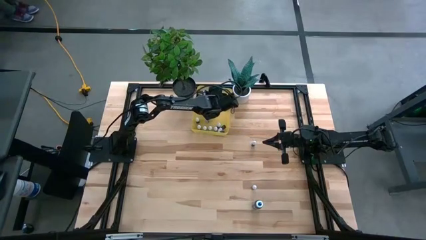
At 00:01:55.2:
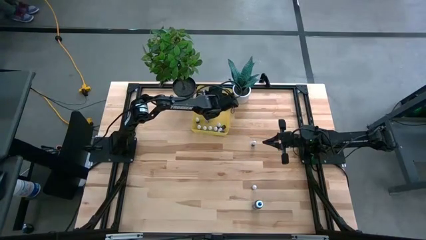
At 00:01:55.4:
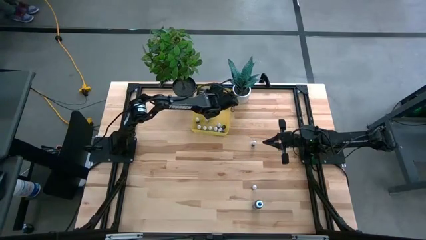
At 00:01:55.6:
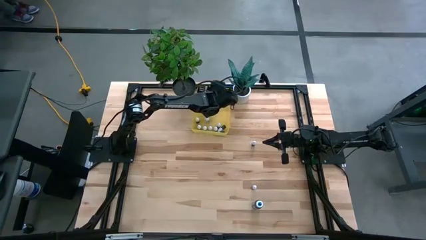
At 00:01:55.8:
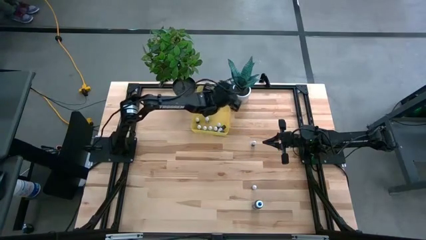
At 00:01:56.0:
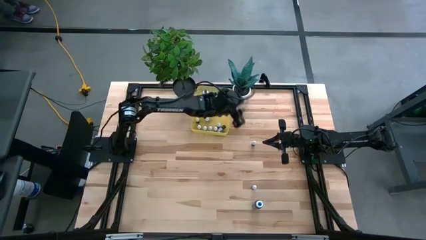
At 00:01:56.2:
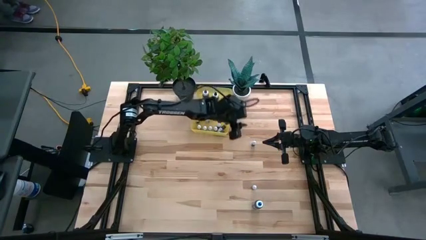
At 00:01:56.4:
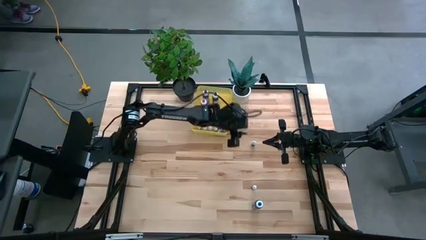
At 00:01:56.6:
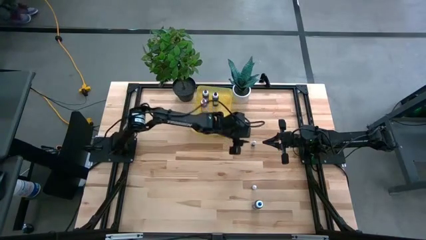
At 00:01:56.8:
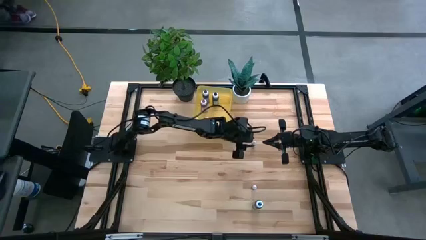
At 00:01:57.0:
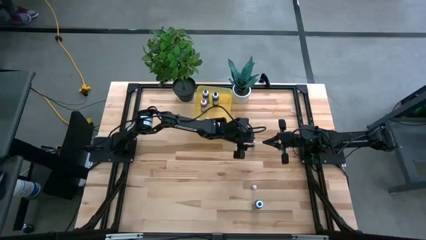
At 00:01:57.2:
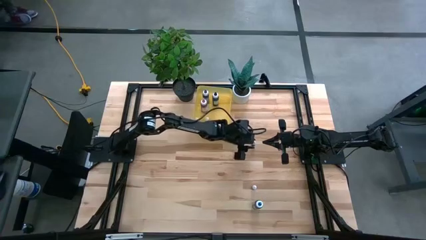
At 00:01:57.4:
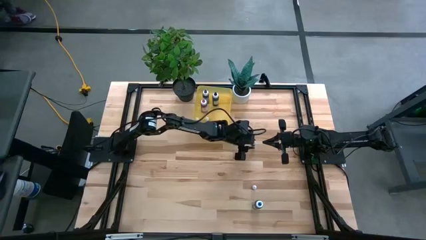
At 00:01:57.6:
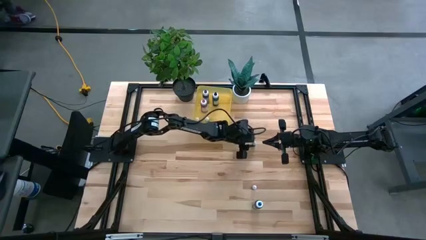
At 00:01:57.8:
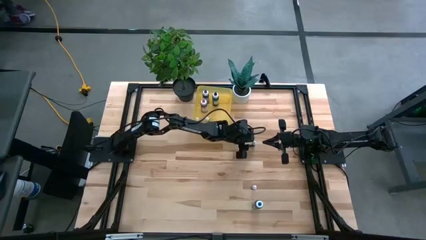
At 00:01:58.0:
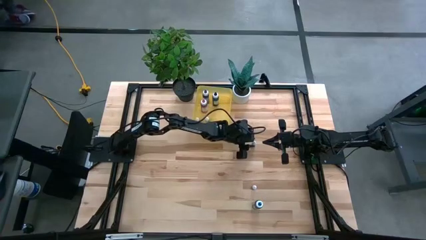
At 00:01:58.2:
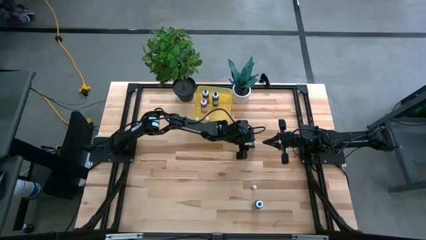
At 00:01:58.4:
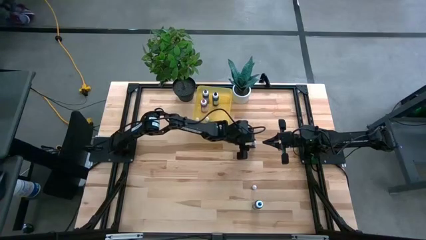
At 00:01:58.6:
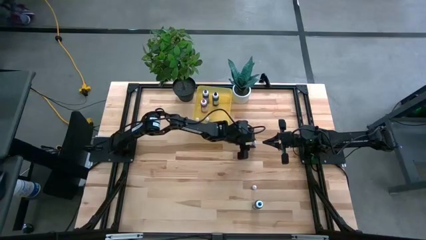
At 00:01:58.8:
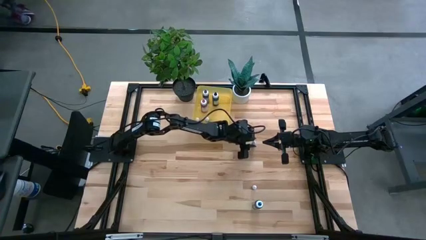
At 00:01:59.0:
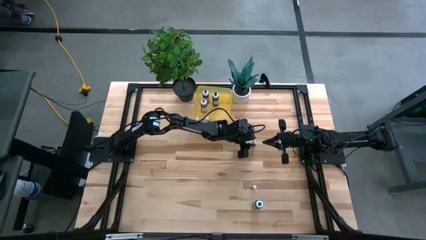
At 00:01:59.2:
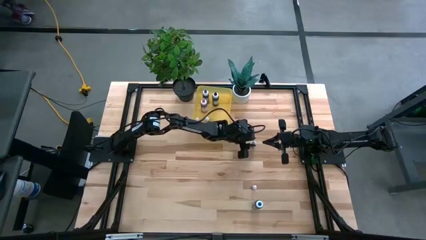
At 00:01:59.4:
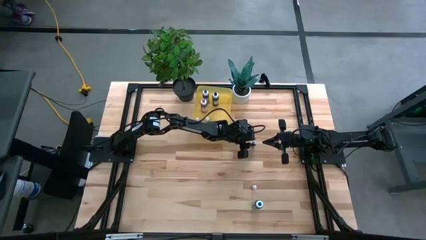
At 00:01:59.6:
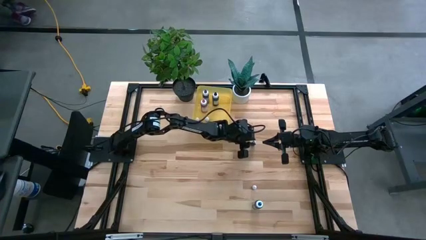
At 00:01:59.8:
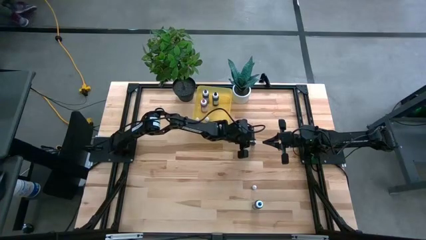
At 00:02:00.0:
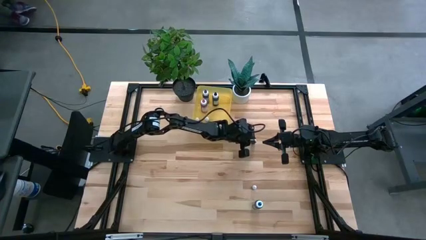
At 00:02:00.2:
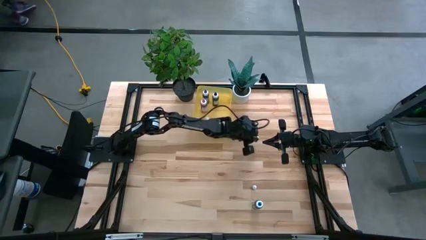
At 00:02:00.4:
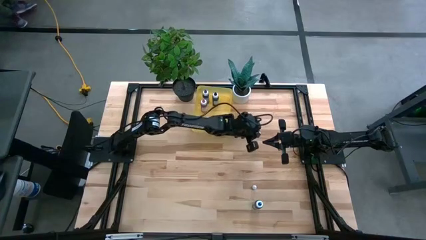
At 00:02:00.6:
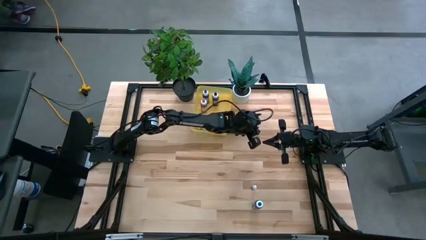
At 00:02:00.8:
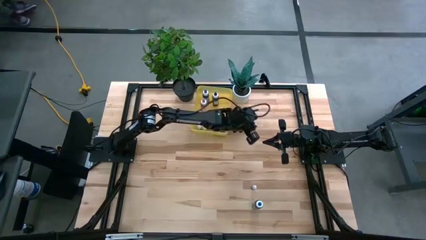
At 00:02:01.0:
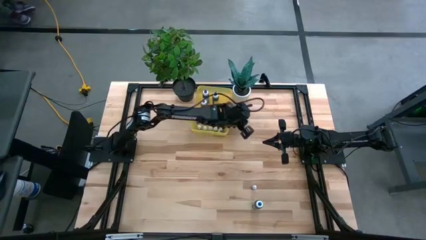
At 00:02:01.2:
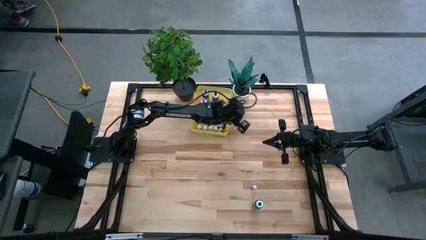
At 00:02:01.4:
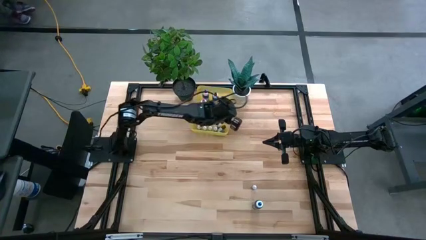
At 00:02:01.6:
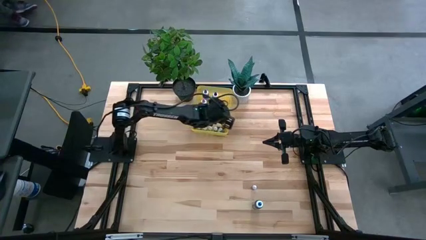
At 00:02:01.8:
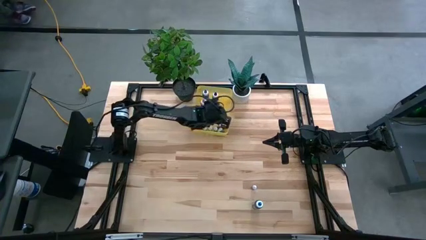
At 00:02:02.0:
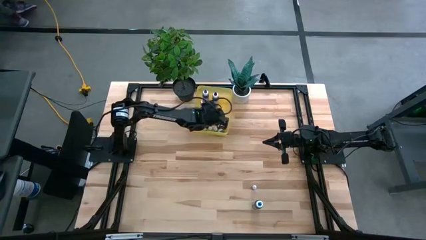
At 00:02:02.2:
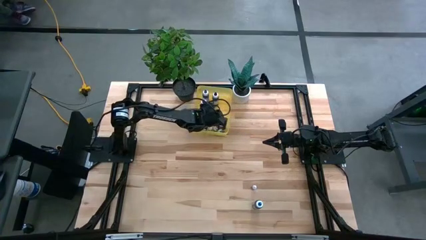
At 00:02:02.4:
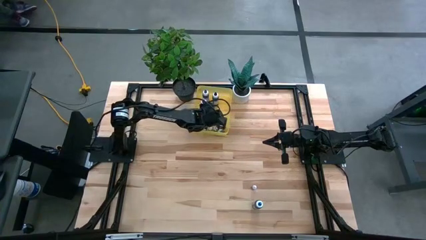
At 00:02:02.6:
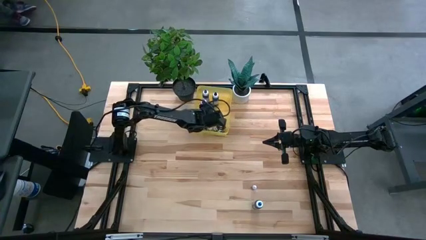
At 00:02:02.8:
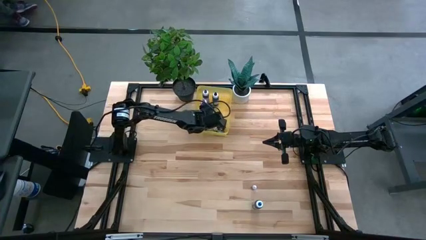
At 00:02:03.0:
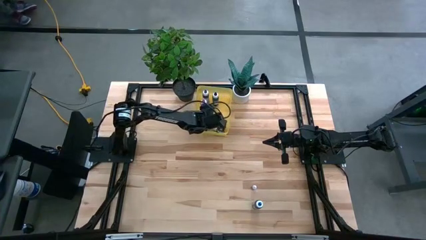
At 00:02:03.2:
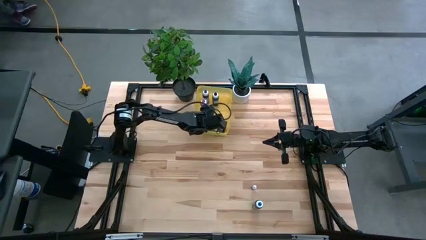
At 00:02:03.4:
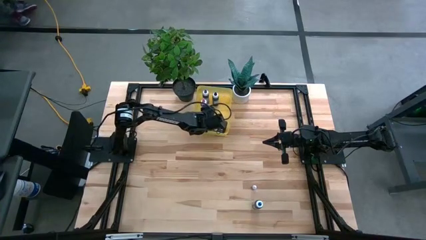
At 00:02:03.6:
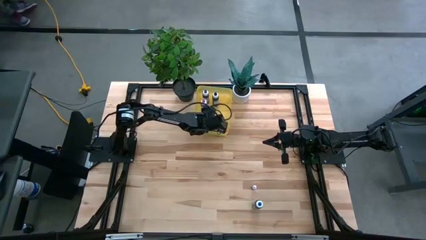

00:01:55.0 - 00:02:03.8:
Task: Pick & Place food coloring
Put the small brown food coloring bottle into the yellow bin

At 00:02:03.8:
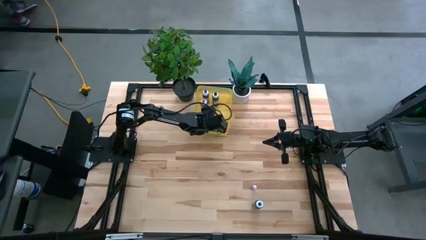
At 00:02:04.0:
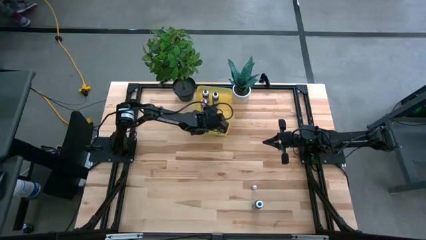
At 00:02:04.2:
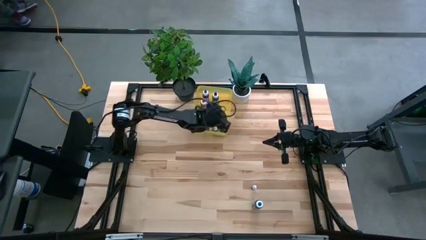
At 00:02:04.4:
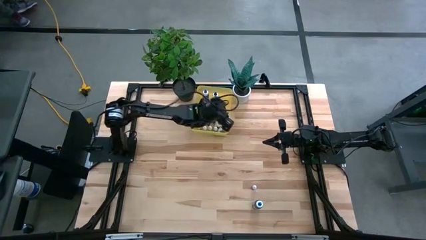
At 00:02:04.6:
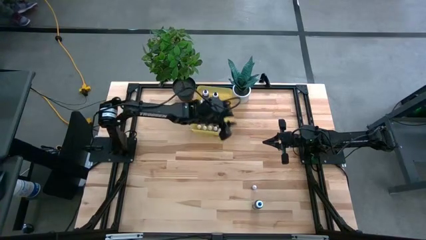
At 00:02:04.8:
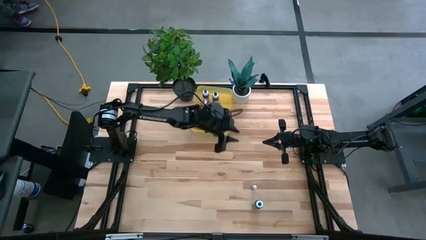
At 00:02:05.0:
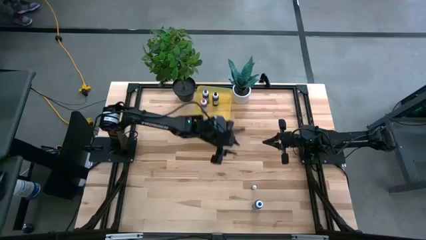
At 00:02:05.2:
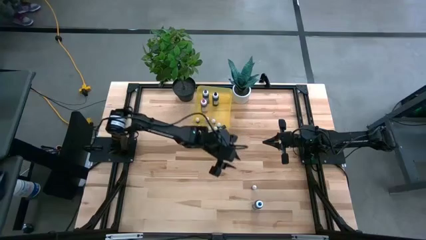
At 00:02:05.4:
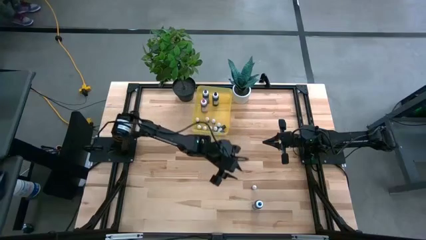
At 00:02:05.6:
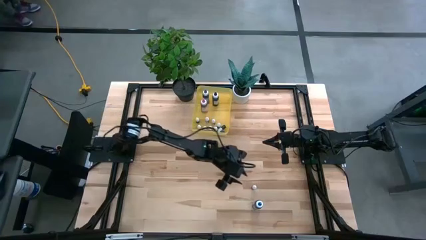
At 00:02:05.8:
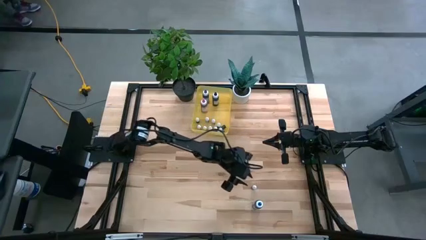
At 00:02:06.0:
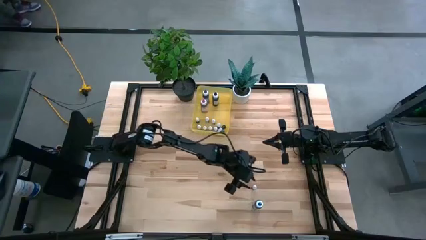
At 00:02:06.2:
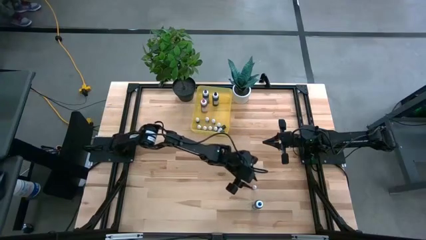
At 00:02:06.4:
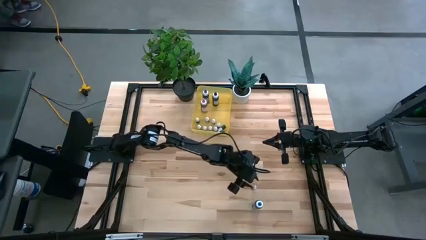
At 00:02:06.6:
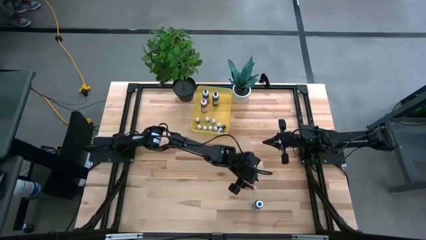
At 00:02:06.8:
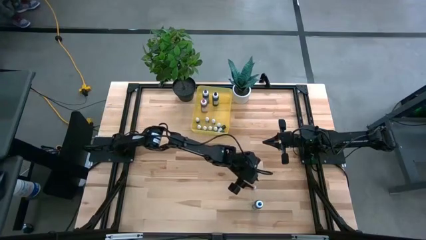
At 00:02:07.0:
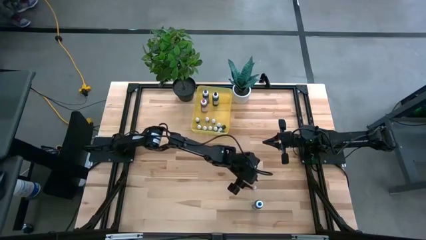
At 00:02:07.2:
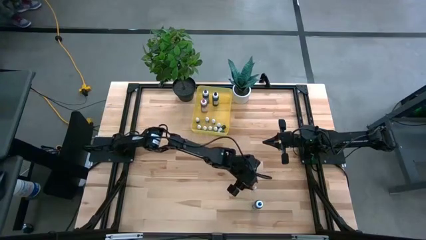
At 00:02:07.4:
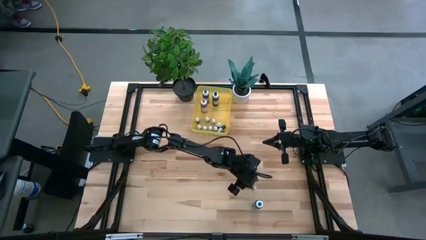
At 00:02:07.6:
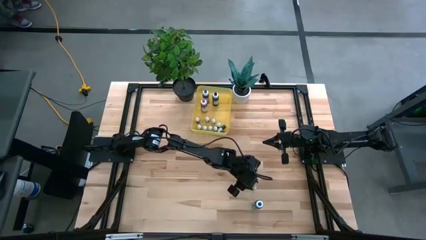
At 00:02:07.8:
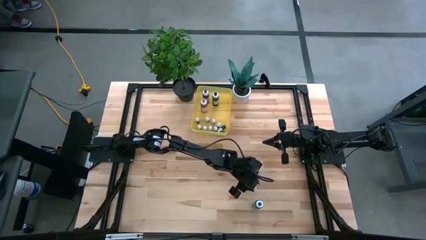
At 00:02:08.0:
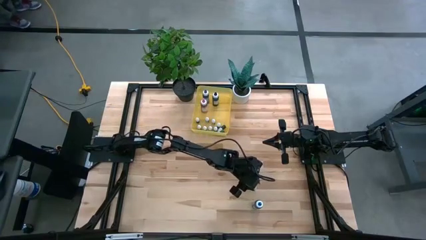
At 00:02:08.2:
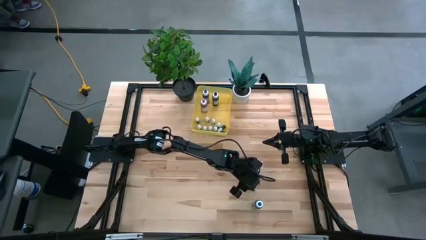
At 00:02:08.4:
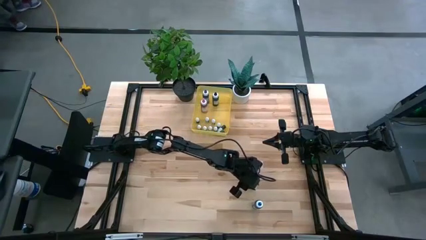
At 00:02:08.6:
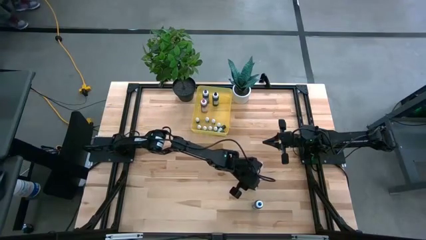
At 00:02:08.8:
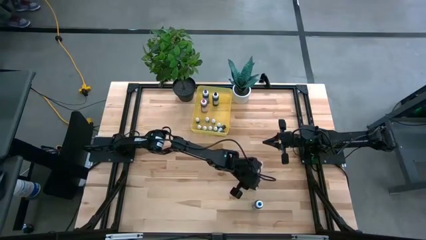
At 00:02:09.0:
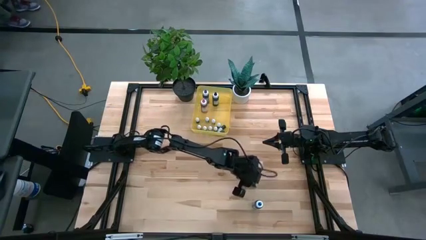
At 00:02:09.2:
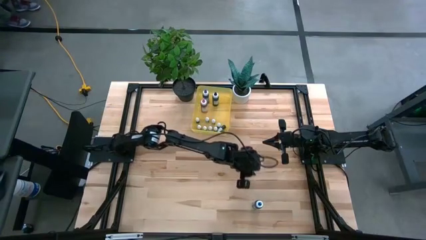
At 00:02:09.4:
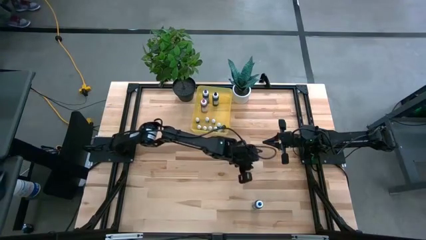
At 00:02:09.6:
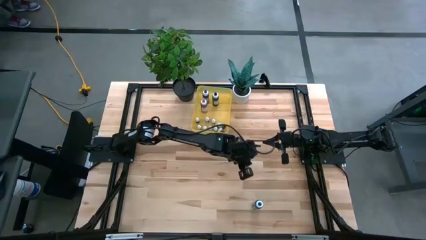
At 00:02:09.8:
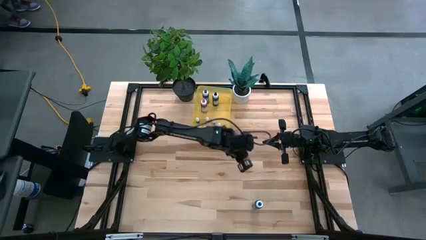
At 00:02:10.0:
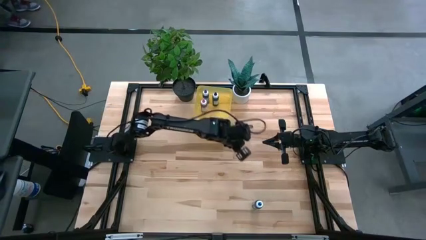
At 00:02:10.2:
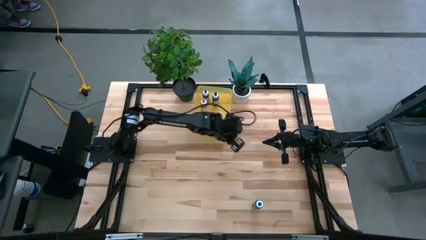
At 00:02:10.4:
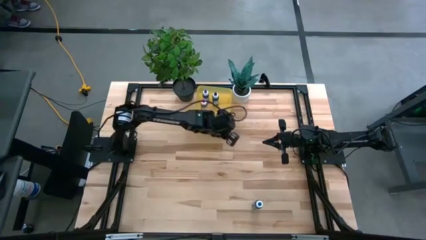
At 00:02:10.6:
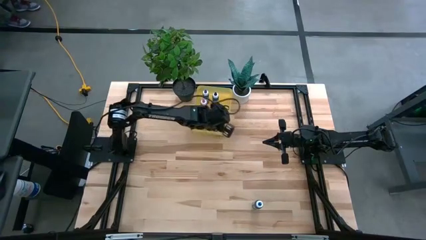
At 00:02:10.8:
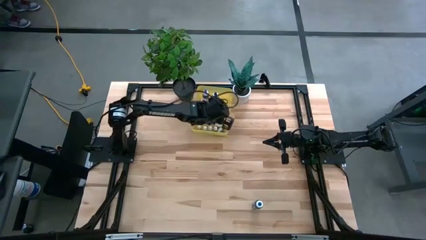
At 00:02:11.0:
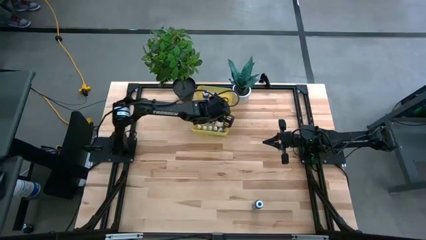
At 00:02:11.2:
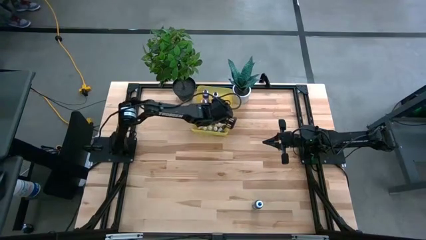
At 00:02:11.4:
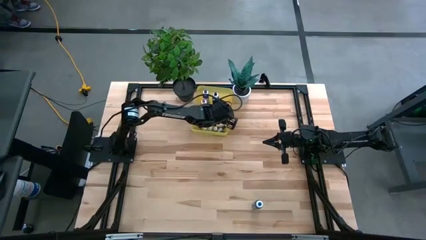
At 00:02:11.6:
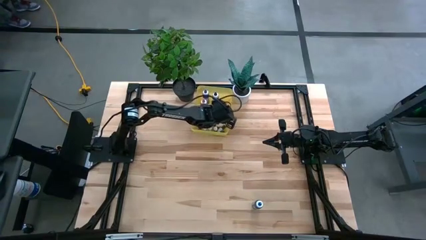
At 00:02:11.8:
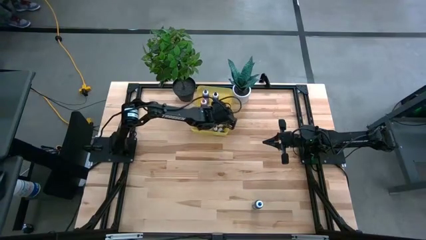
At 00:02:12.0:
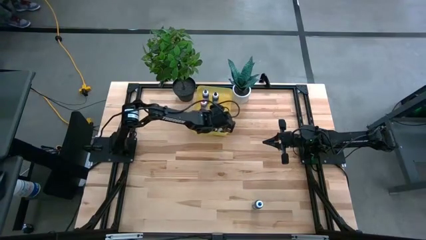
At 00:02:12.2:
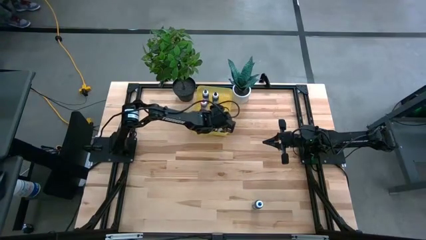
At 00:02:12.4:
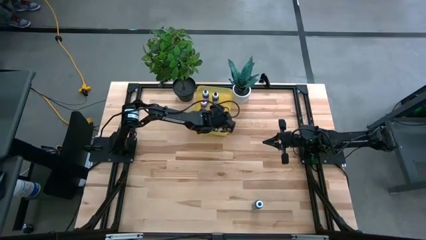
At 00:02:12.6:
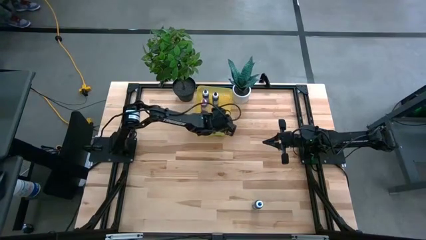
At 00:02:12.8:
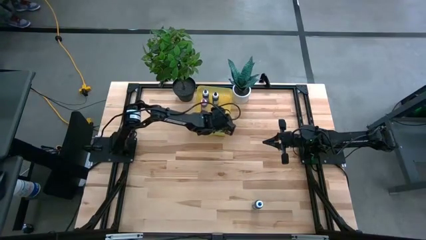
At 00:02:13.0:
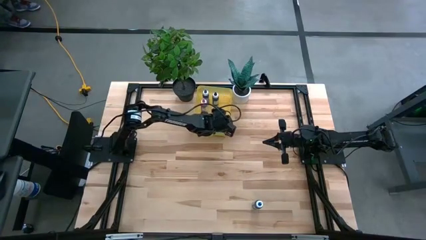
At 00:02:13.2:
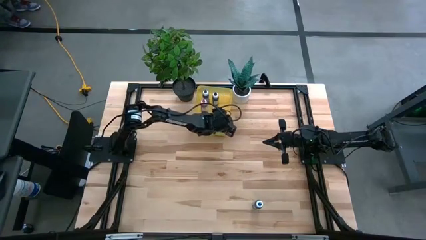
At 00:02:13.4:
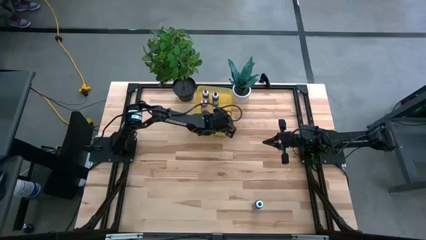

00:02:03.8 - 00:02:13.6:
Put the small orange food coloring bottle into the yellow bin
